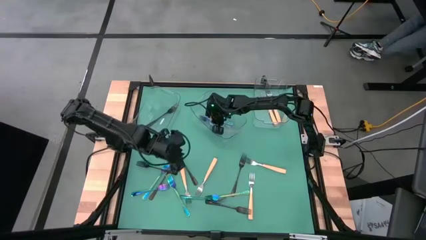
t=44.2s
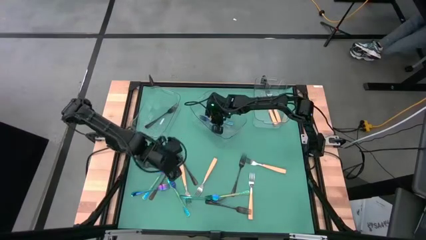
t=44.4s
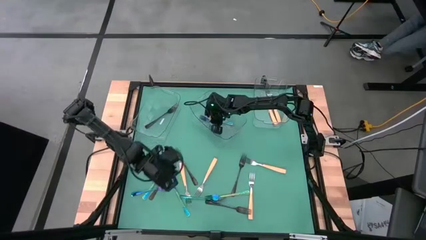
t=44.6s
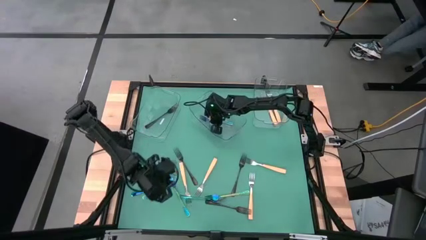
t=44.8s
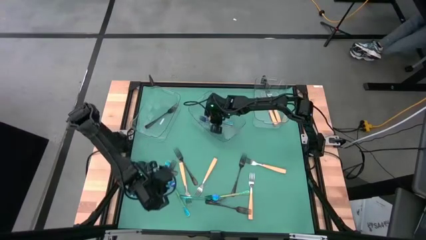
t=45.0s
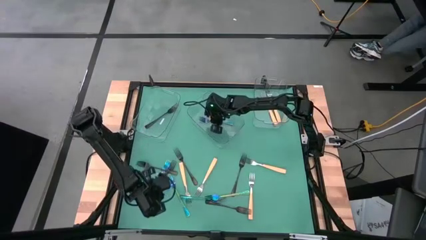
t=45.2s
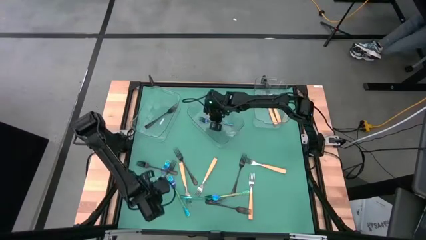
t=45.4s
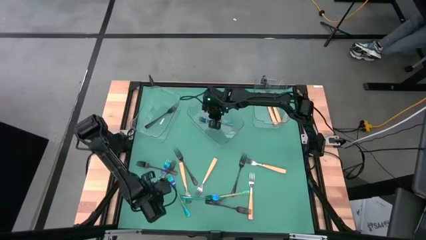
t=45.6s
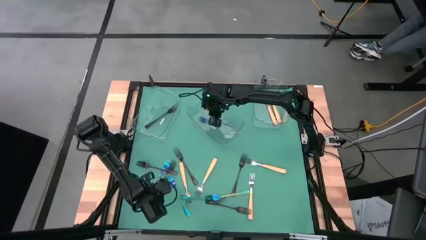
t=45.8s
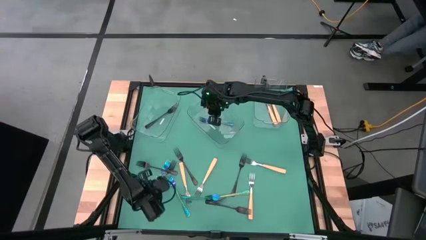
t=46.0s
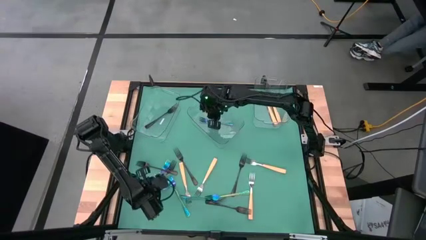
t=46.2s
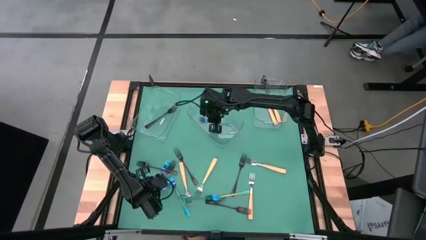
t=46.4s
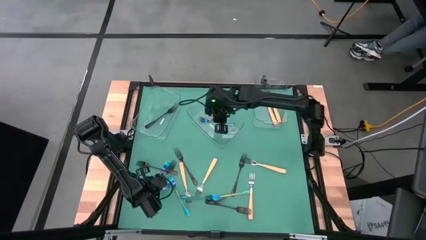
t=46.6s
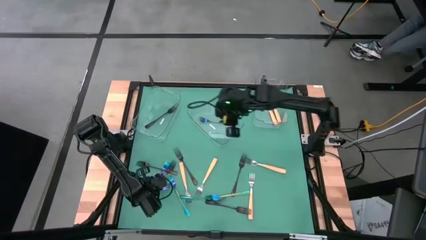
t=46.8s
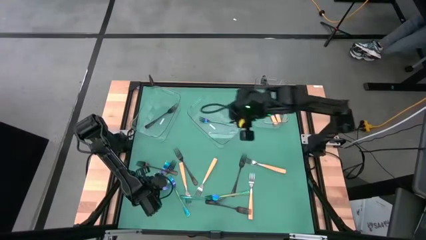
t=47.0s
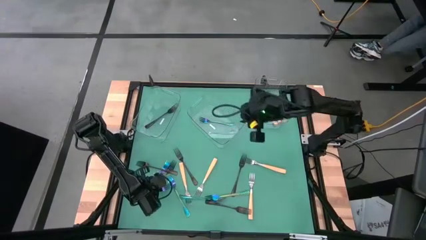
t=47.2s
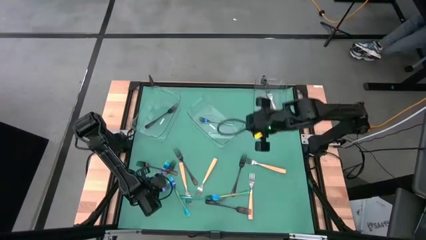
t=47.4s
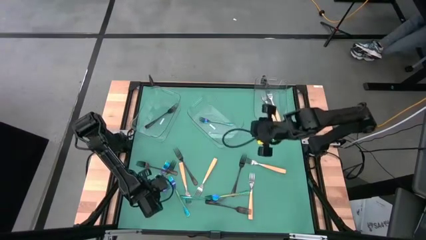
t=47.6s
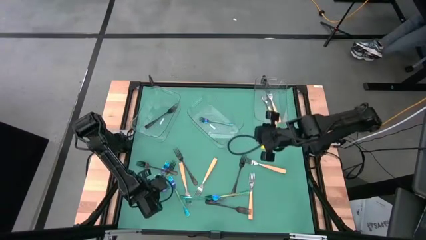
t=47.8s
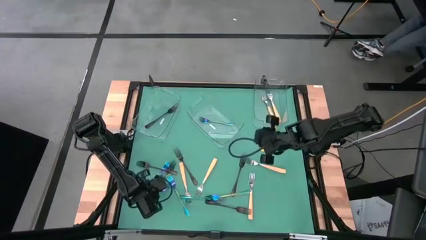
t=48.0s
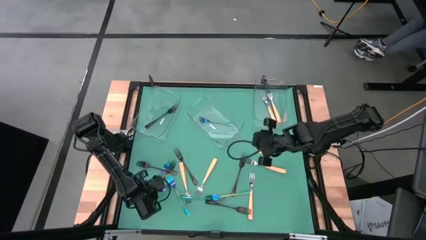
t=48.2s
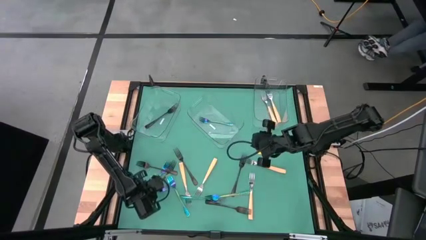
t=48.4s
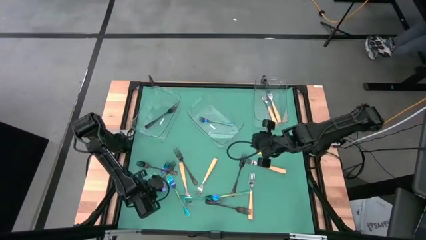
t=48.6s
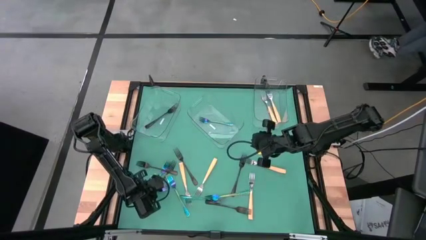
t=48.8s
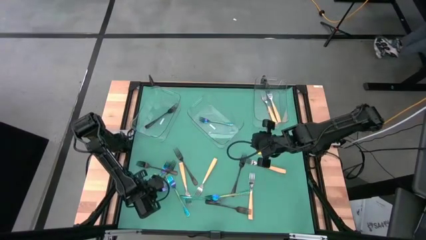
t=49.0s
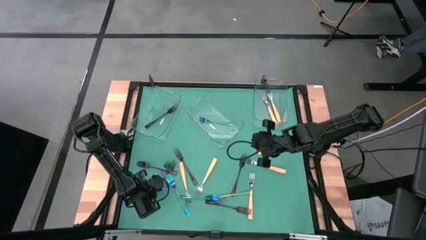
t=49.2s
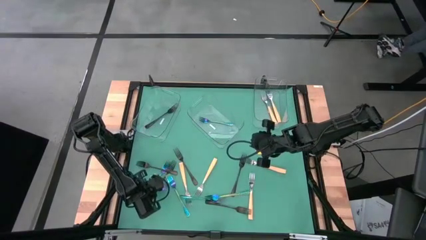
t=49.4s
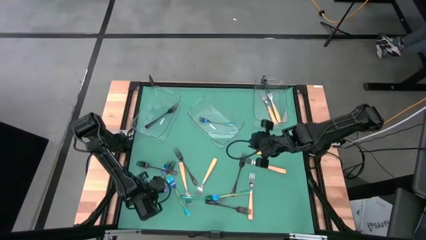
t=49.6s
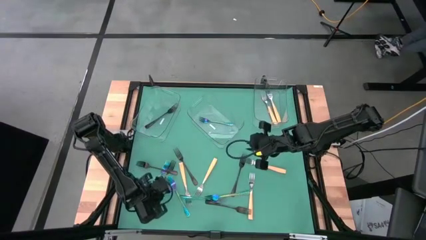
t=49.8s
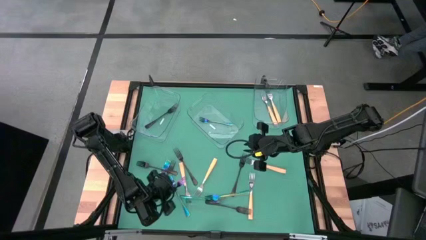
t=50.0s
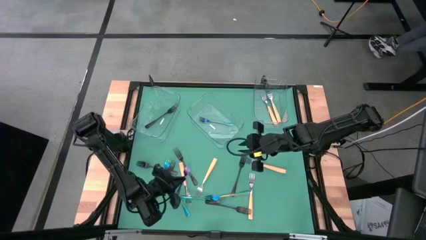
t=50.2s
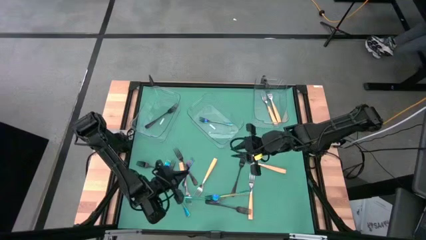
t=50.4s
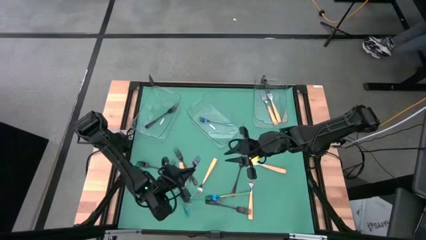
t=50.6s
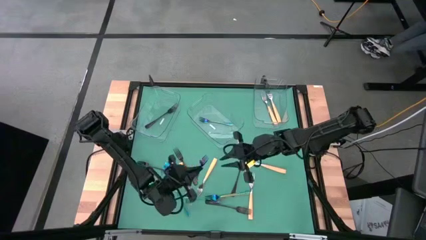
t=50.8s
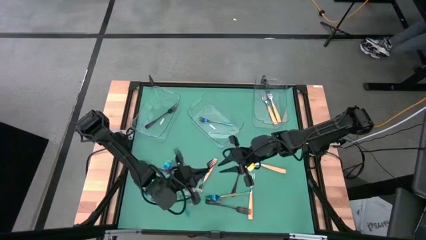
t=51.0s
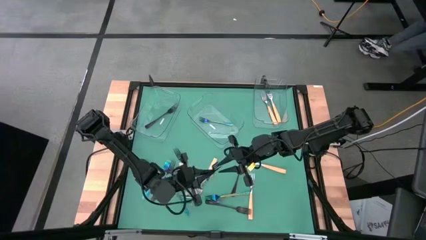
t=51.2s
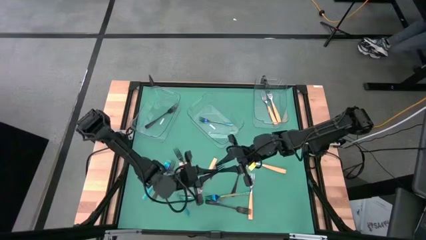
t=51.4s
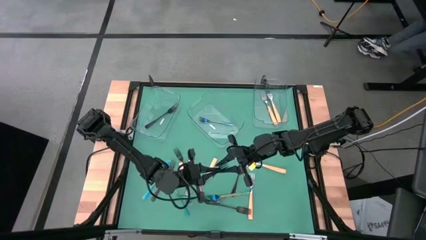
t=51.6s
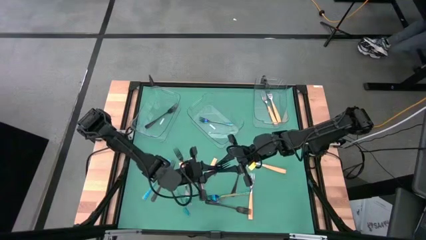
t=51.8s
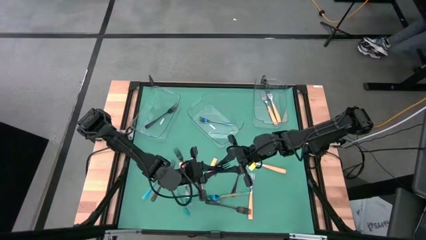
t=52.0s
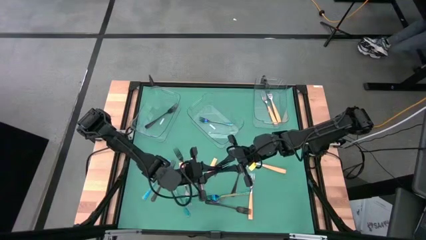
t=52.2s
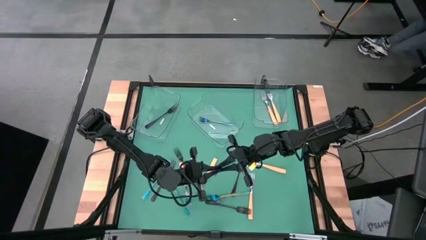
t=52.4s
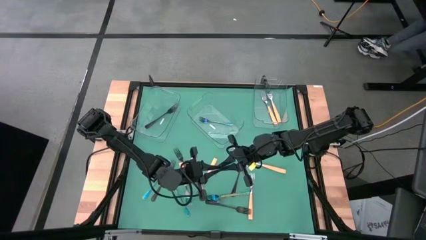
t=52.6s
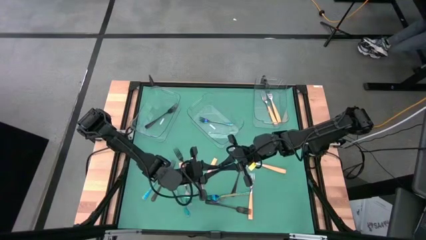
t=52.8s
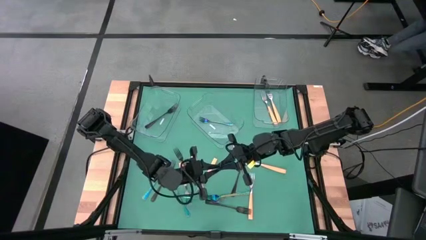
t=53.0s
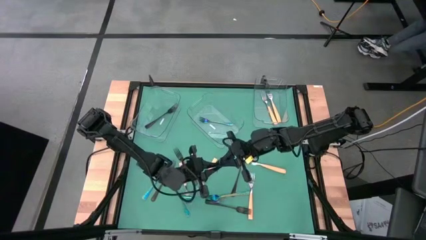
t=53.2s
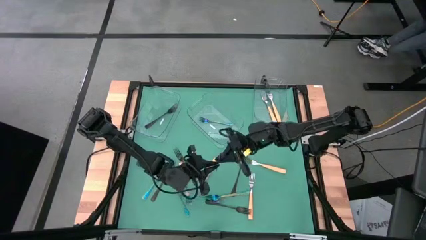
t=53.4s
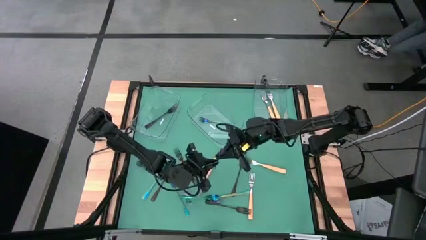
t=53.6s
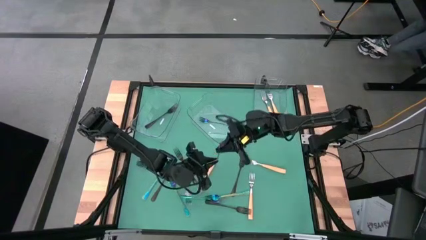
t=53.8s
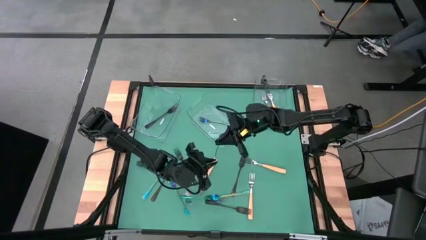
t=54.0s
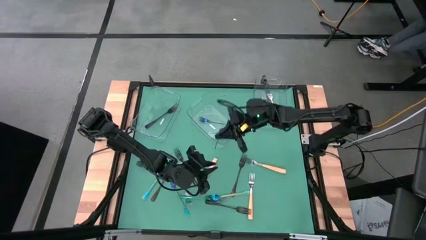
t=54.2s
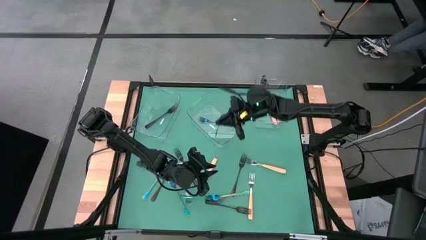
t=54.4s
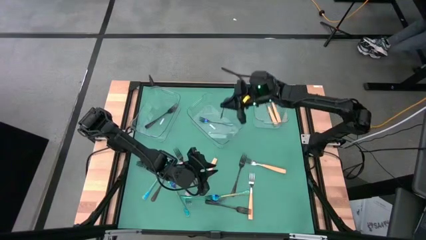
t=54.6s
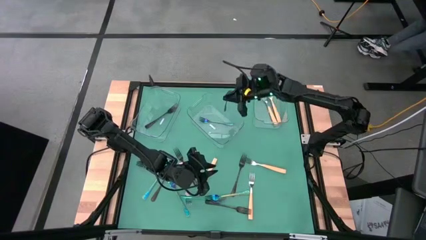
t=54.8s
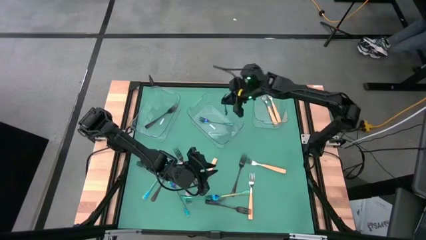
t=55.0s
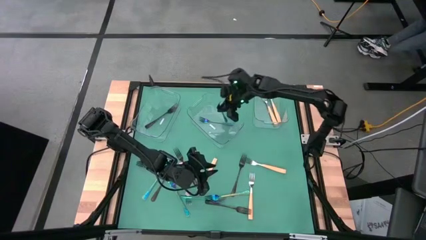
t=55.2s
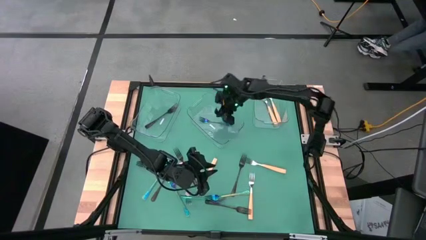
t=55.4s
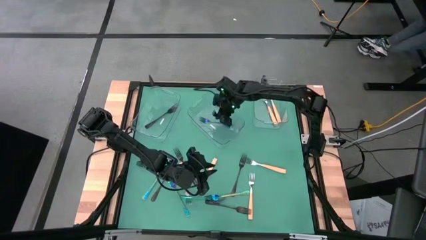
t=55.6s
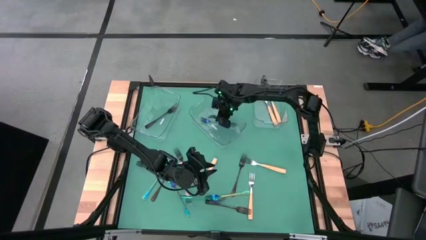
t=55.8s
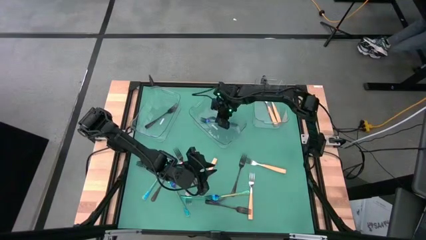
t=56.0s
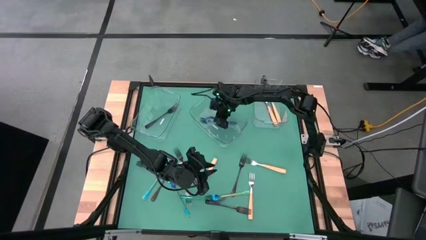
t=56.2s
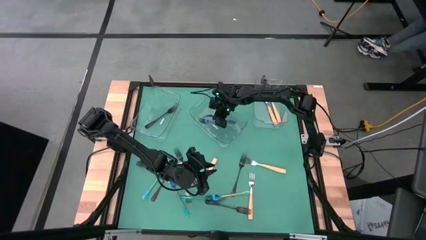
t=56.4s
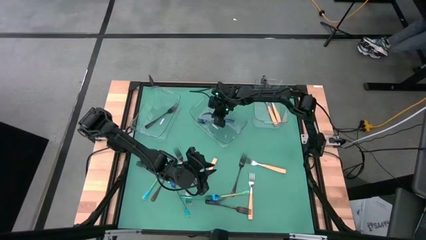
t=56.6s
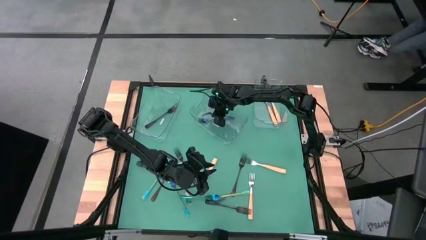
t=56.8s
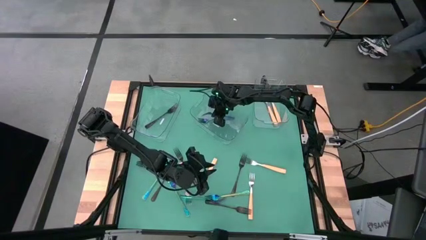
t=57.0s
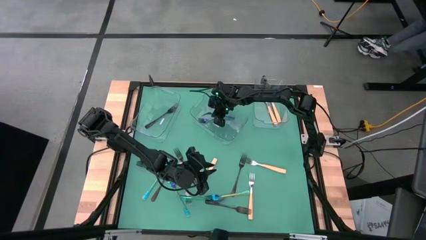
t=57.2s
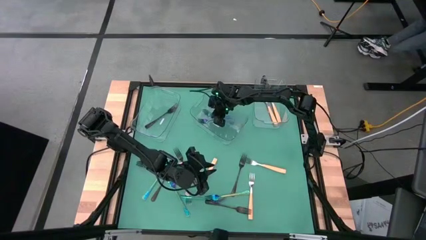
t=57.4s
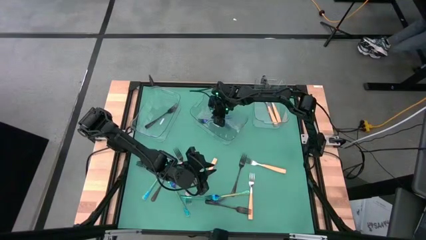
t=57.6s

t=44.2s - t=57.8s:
Task: Sort silverware by color (type)
Put the blue fork into the center transparent bin

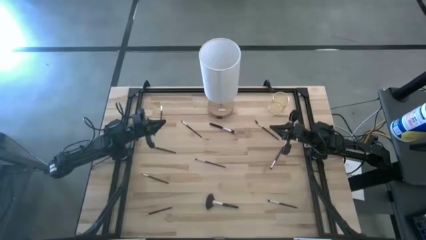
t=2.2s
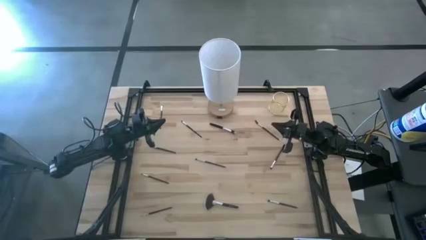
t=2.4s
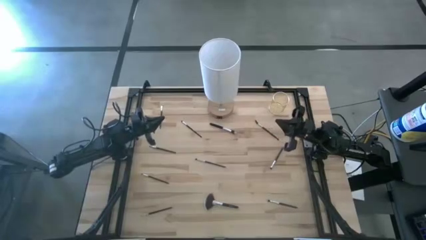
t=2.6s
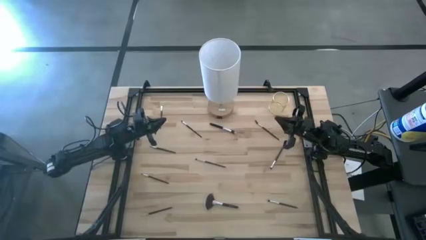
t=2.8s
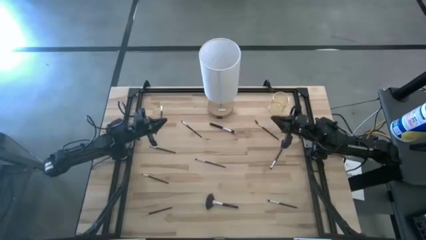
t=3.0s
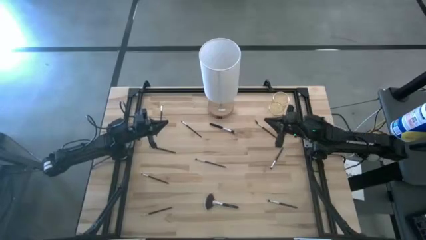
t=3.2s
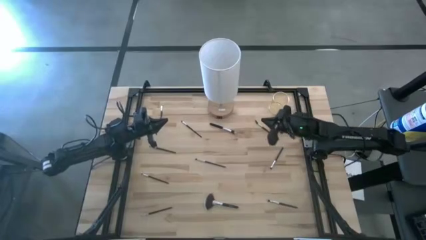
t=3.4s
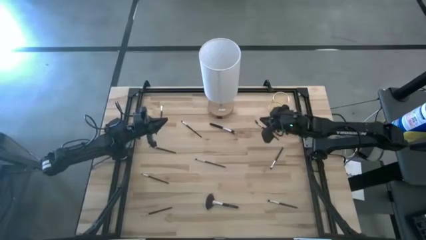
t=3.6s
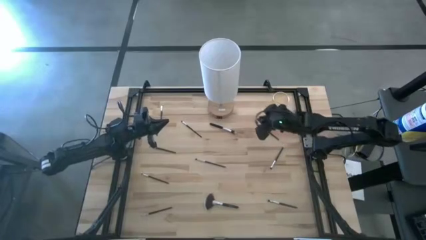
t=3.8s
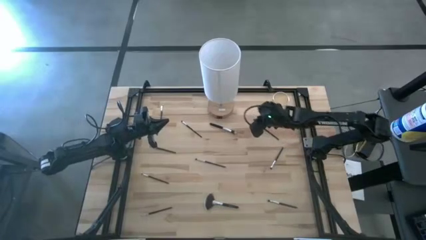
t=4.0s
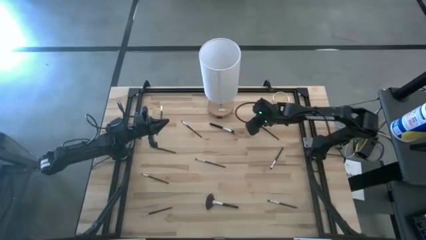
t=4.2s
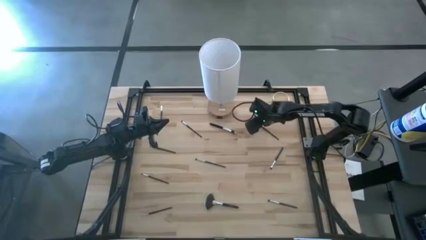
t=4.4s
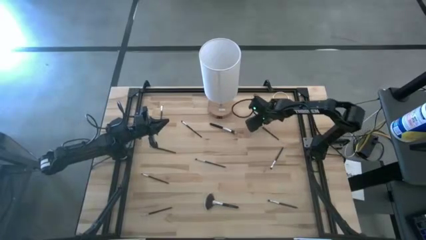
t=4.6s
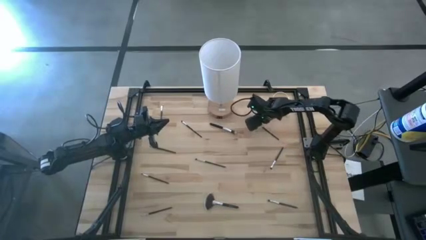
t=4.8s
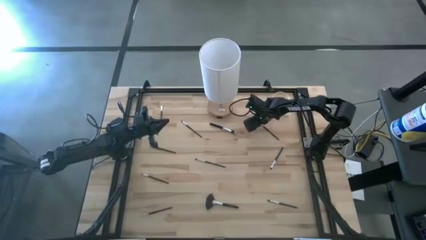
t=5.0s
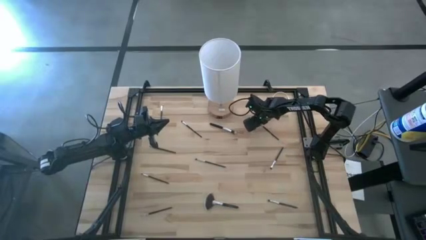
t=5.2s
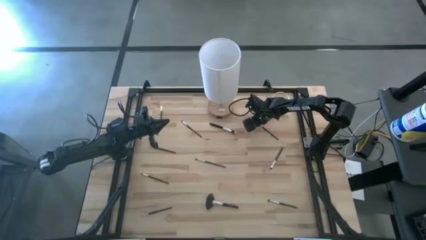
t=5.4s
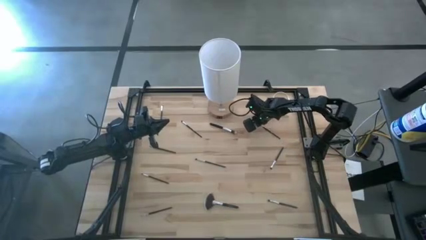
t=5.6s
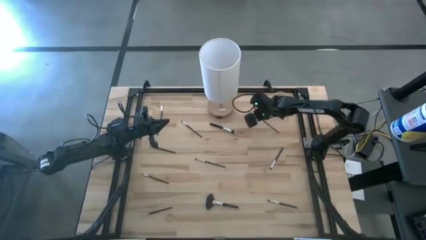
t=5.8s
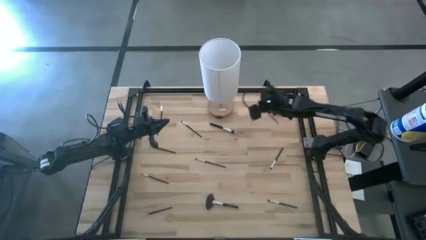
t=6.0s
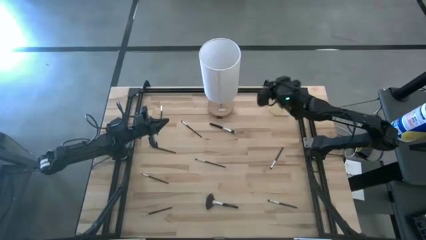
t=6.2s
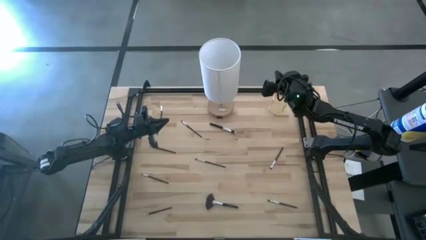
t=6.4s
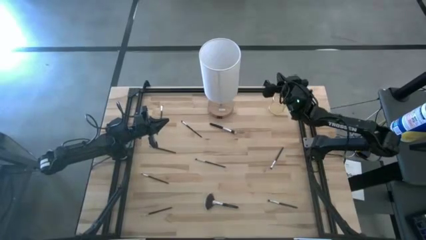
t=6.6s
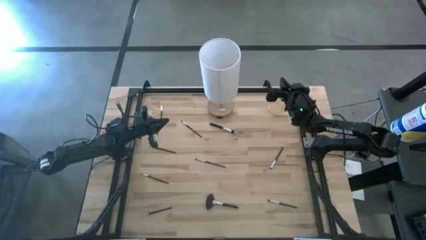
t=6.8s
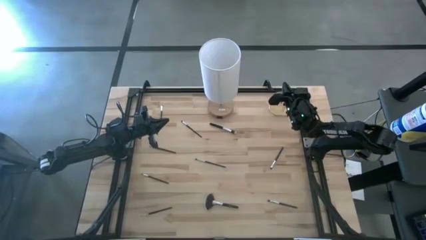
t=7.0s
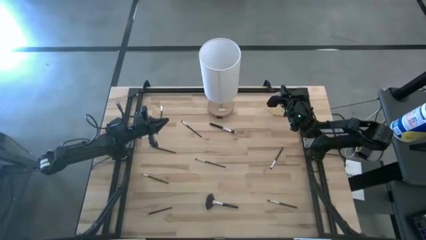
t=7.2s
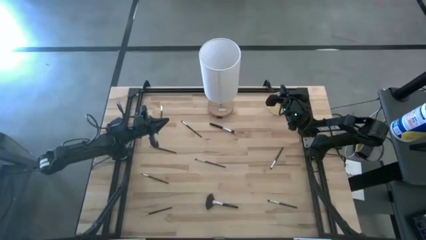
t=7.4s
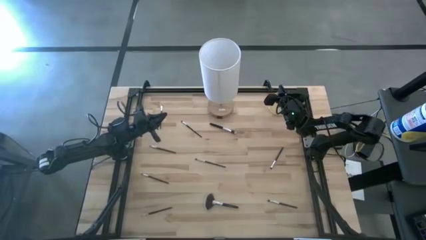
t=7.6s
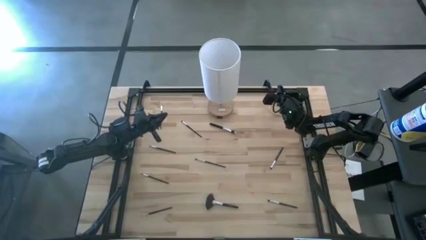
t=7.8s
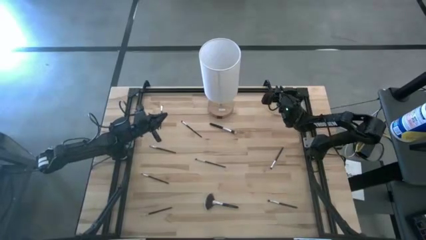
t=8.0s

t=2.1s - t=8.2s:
Task: Pick & Place Makeup Brushes
Put the brow brush into the makeup brush holder
